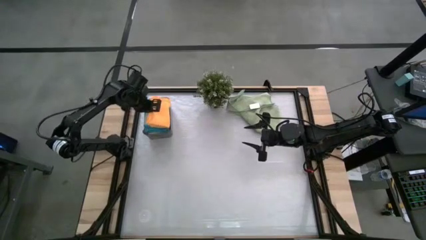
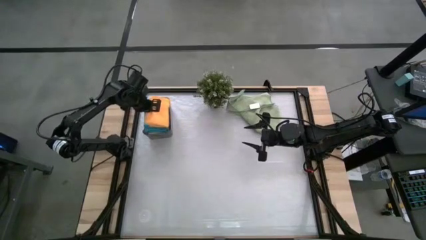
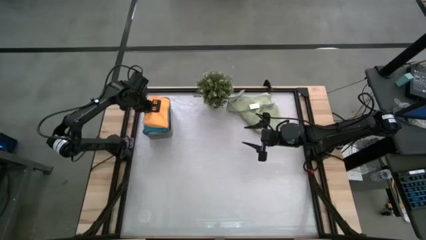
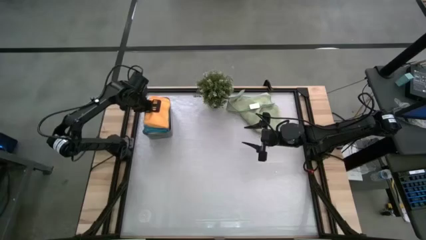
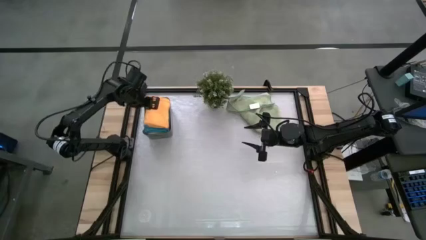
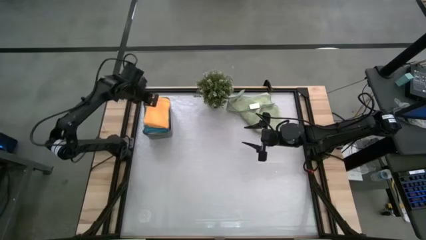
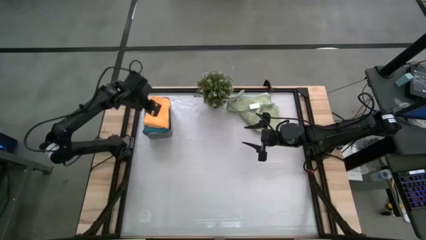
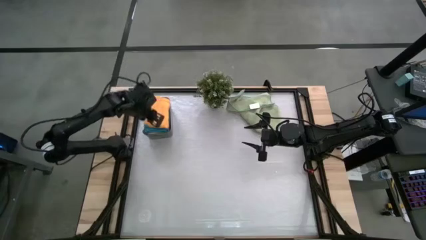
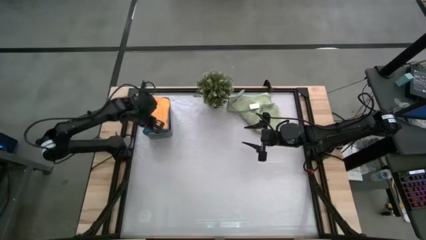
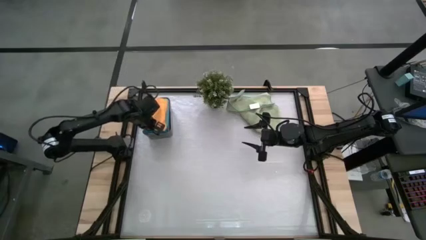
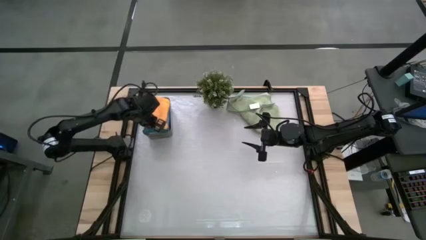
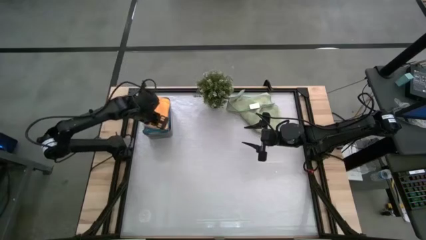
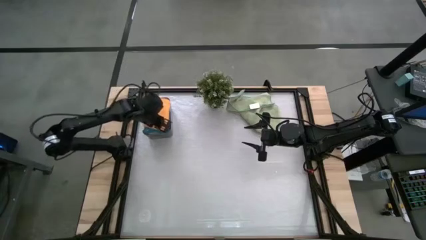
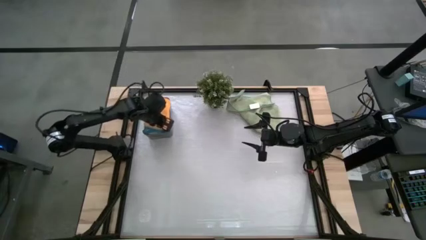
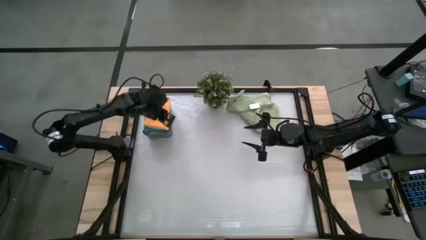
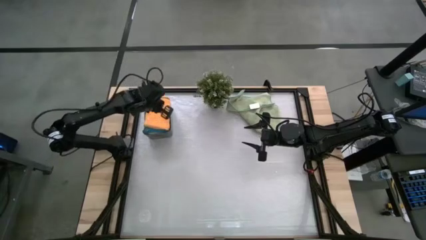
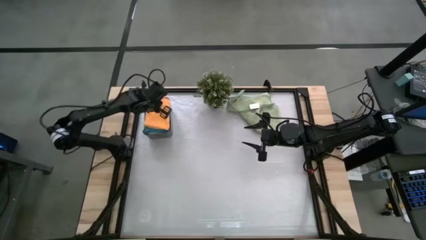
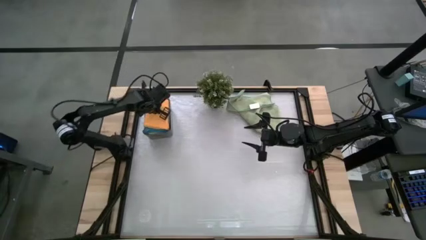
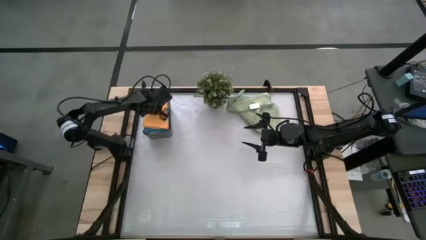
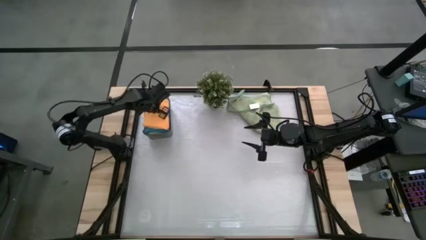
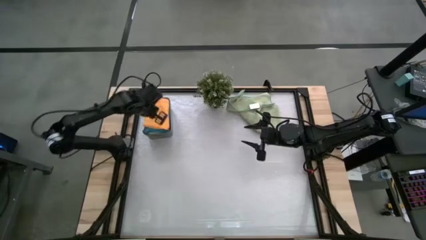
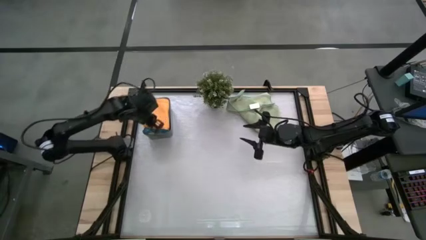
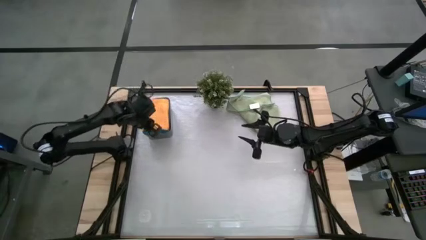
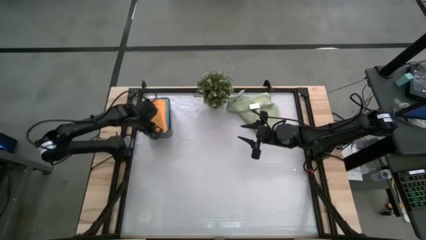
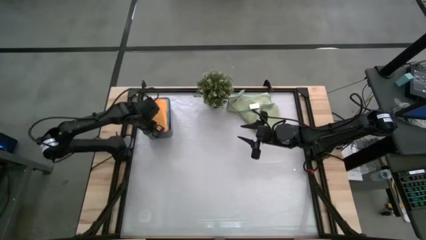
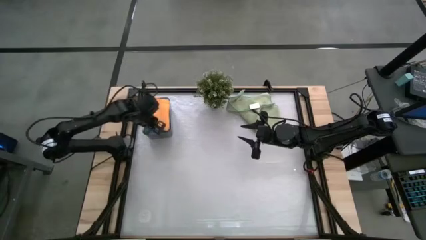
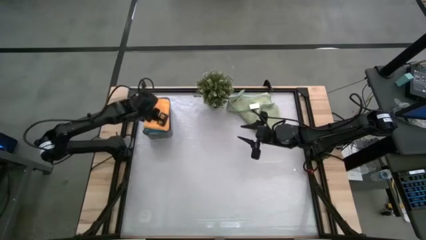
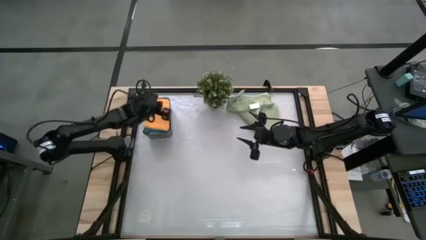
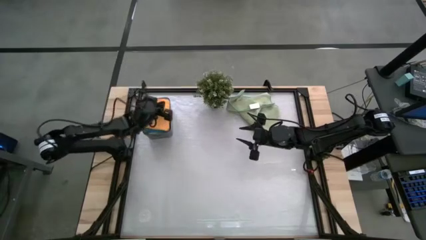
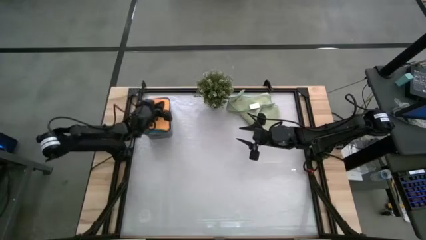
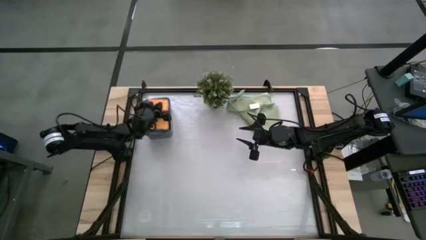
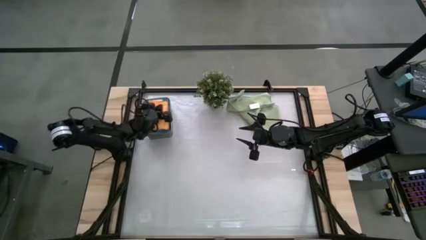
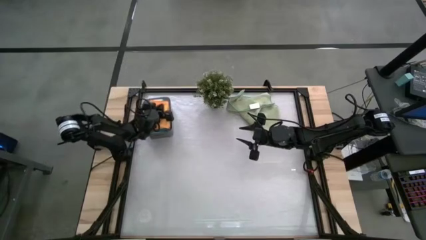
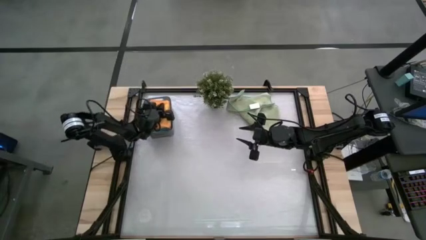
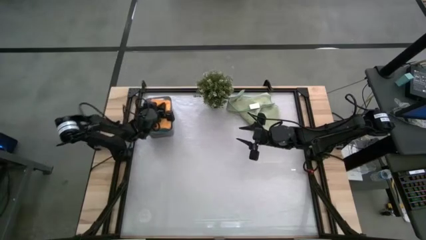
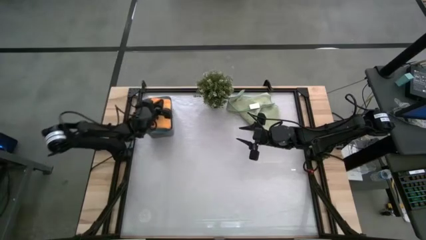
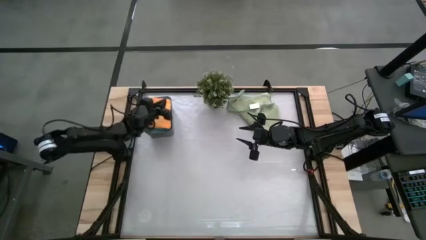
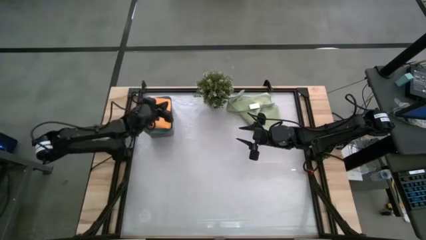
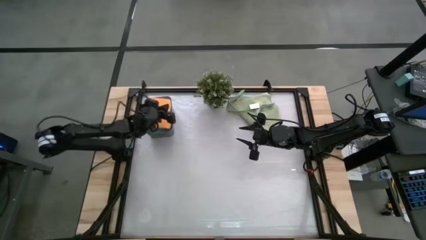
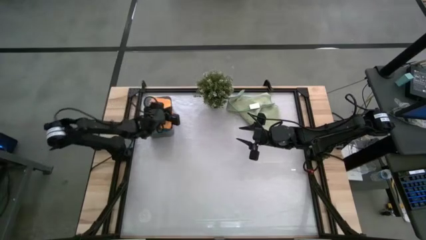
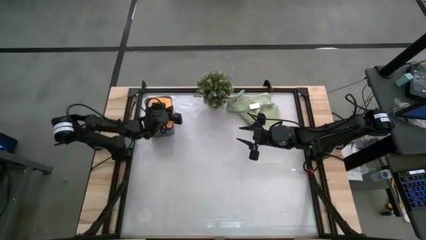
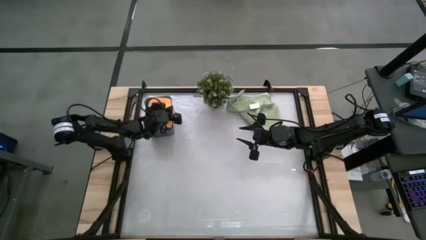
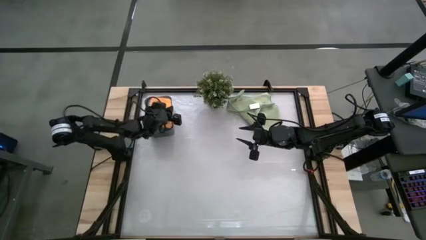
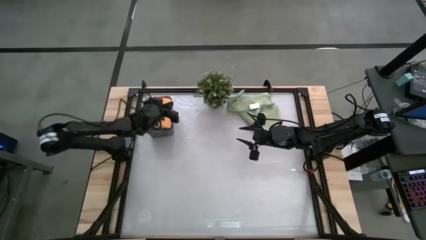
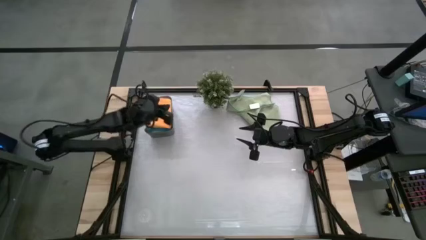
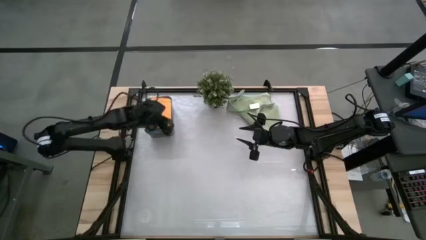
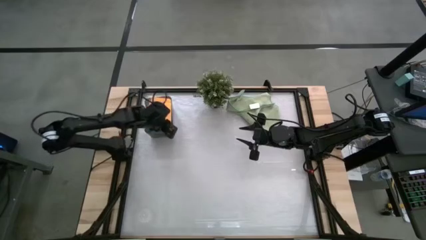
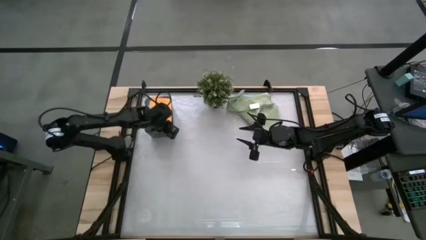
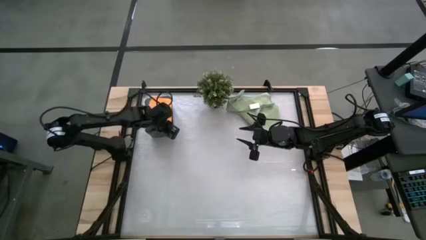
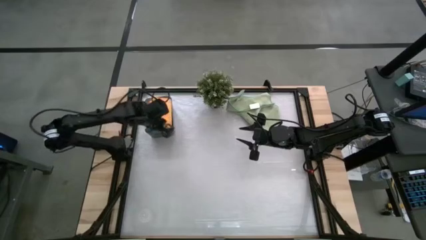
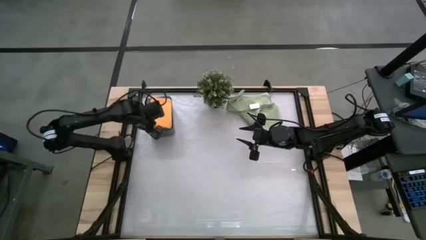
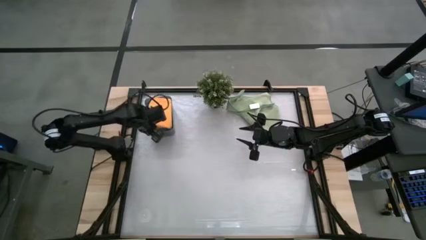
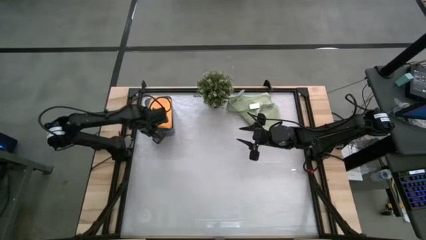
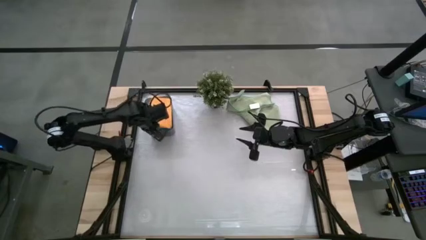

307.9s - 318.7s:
Task: Fold microfiber towels
Put the orange microfiber cloth into the black bin

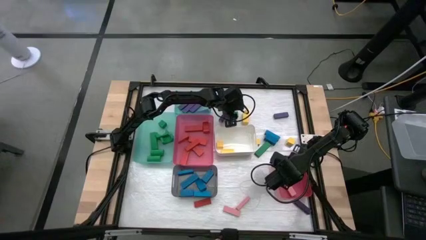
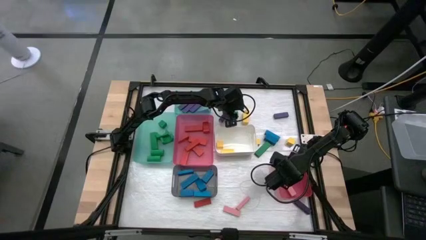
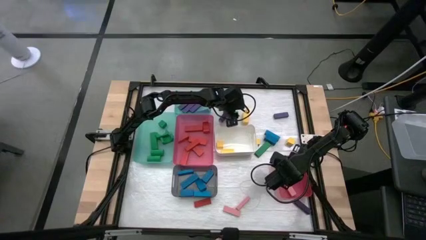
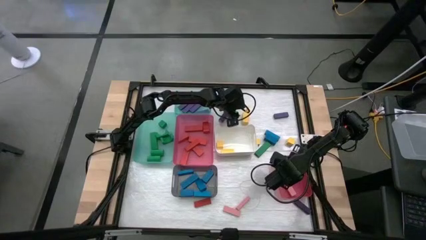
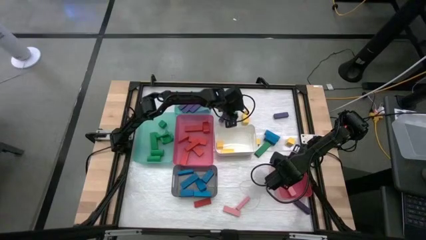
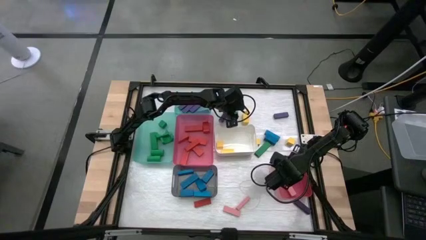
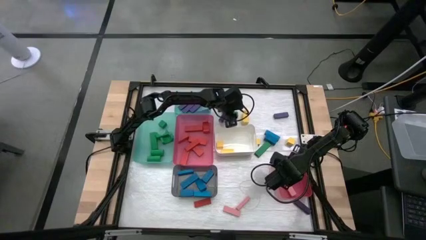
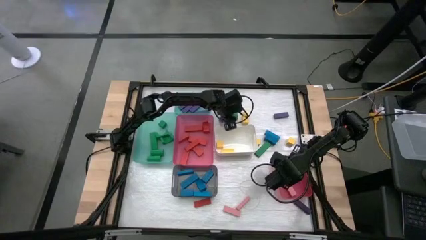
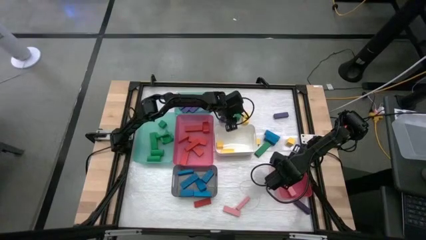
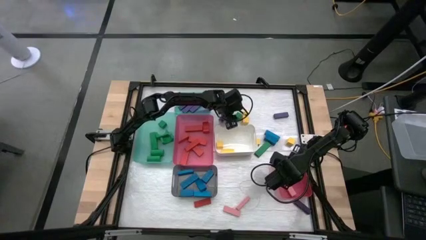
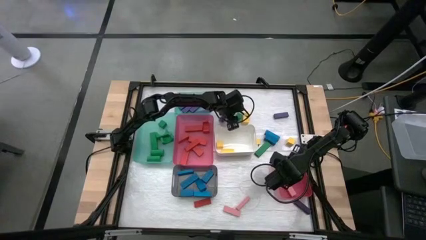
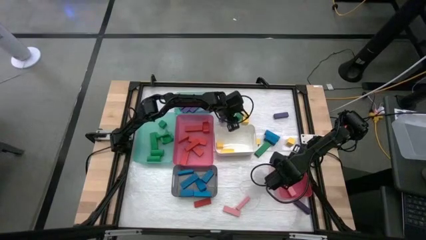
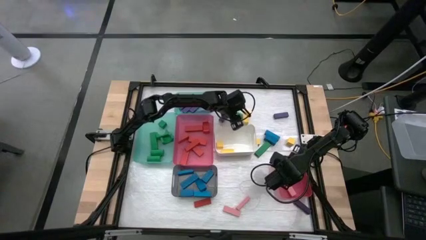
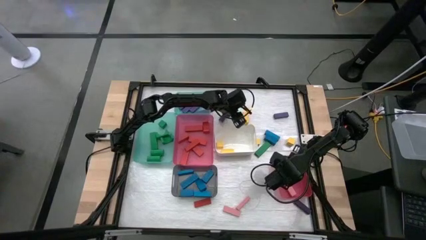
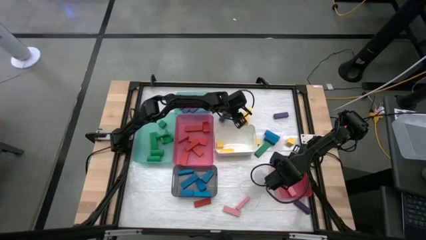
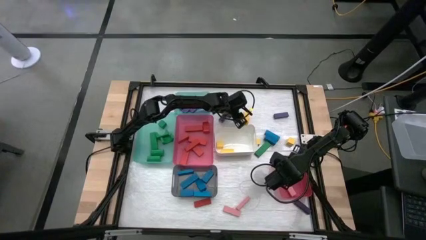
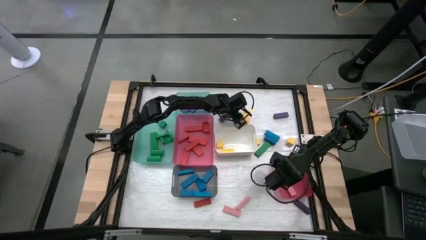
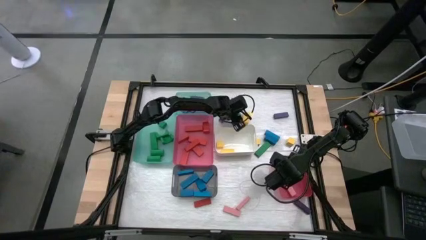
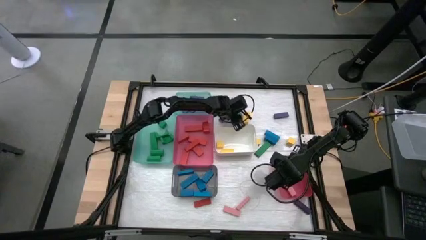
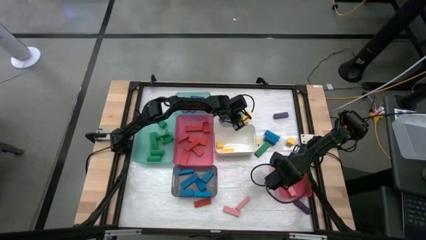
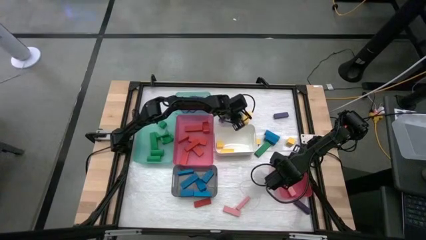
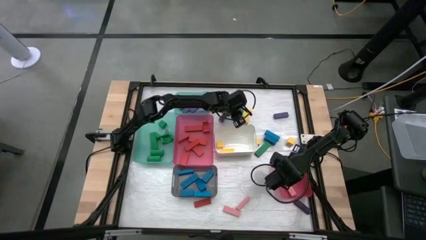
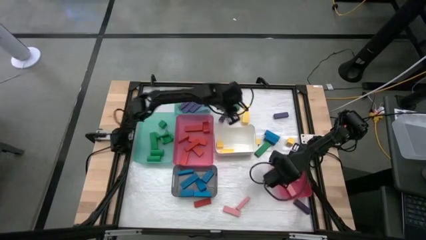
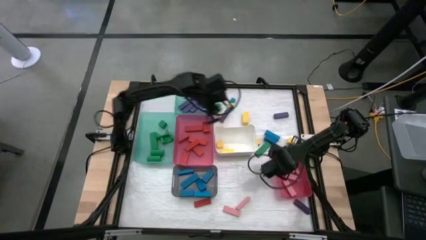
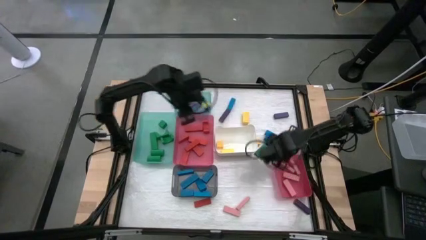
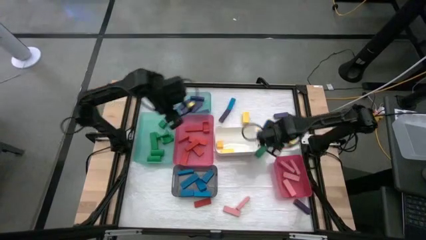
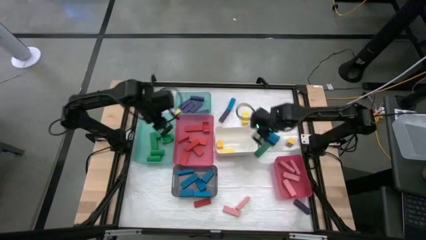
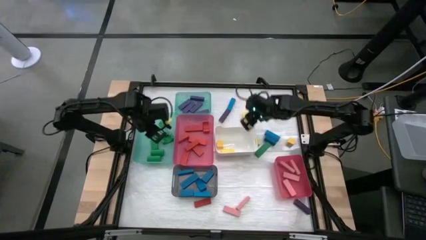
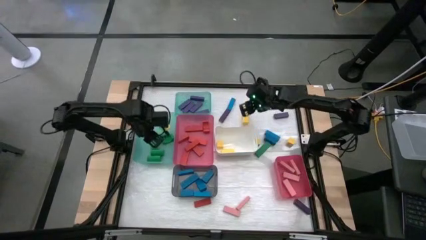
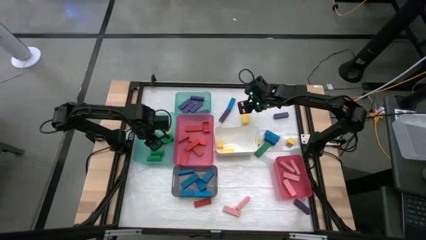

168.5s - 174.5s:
Task: Sort blocks
Put the green block into the bottom green bin

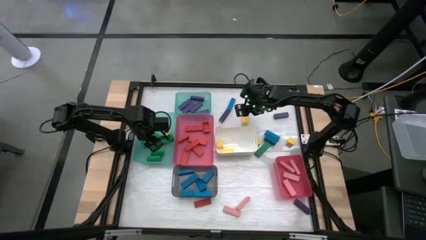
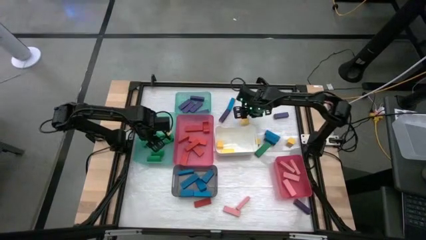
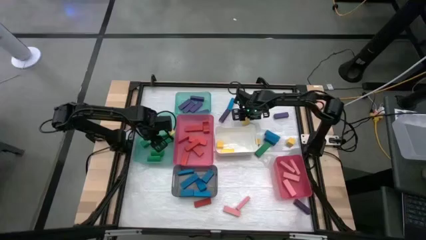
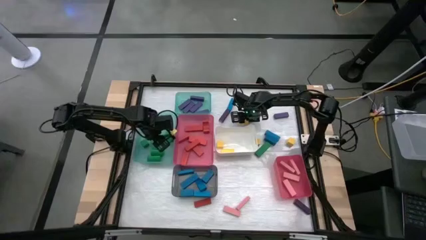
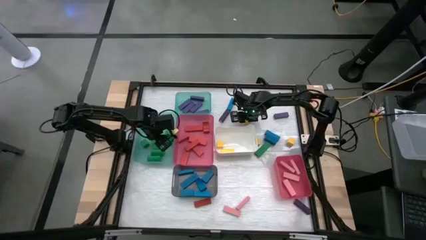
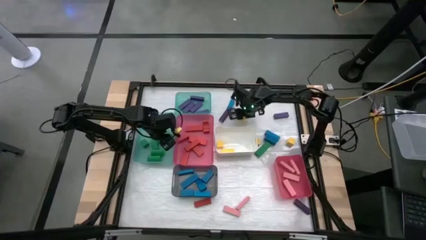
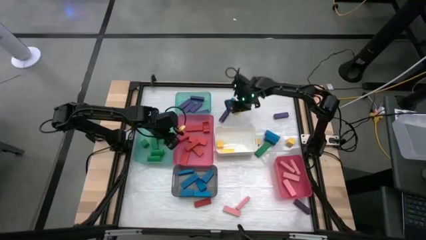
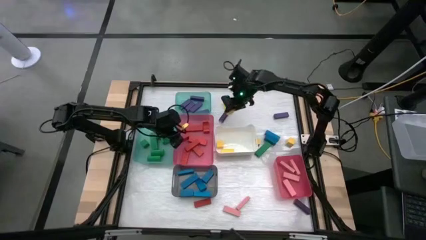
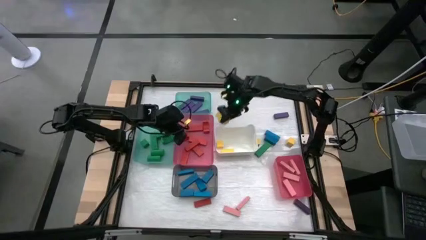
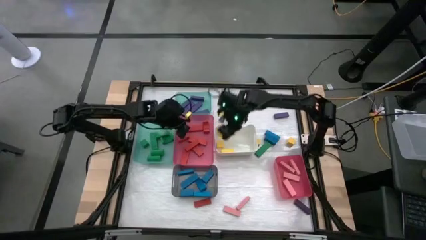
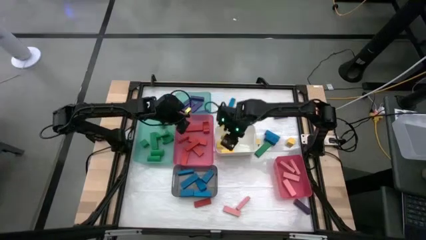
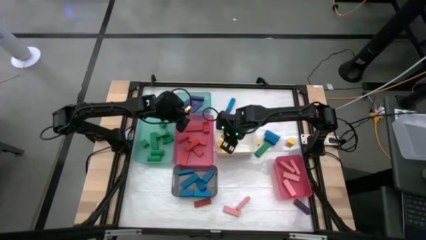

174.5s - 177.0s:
Put the yellow block into the white bin
